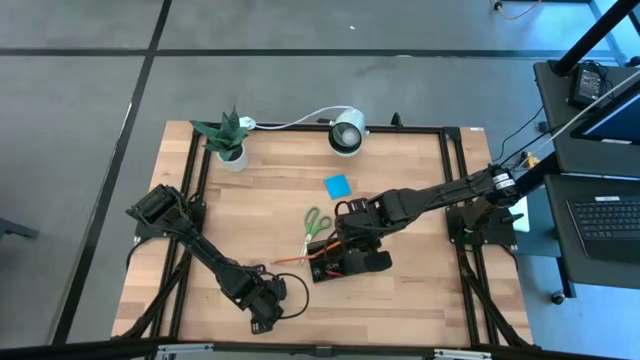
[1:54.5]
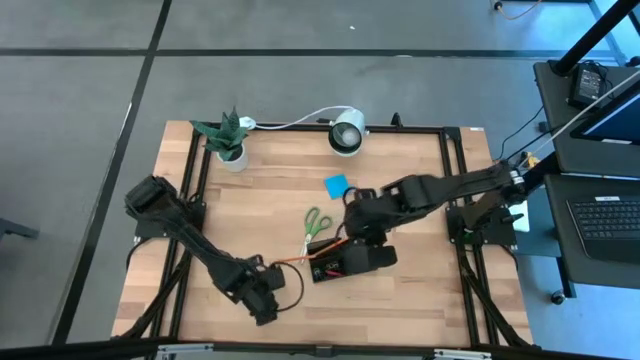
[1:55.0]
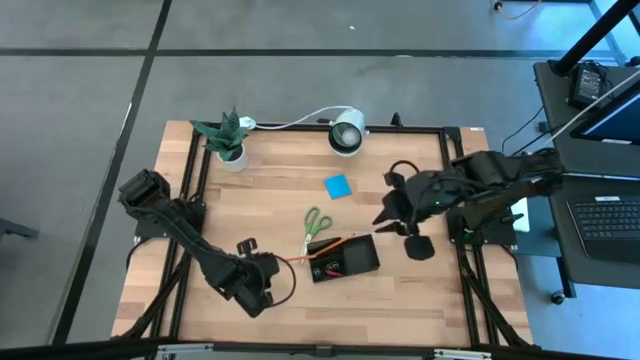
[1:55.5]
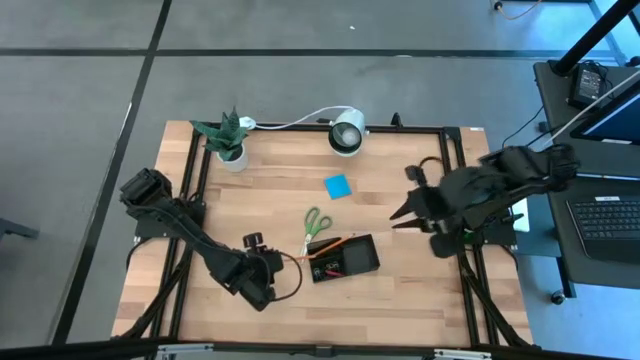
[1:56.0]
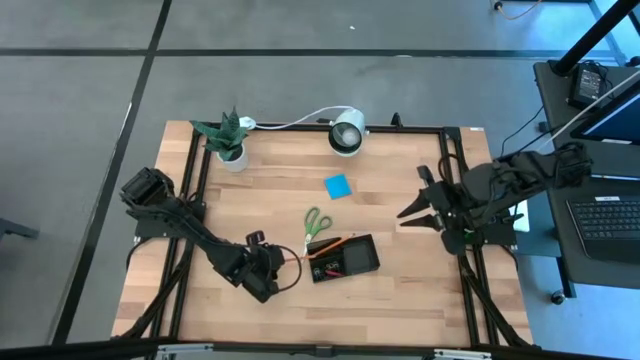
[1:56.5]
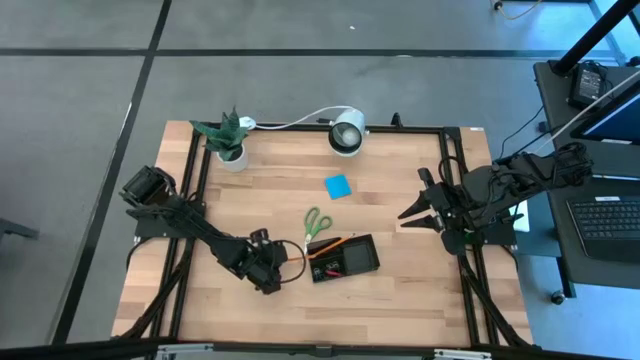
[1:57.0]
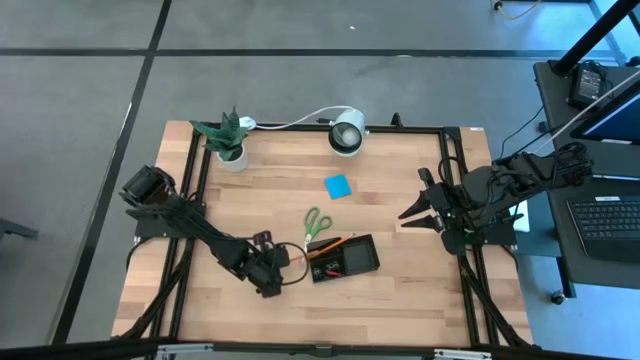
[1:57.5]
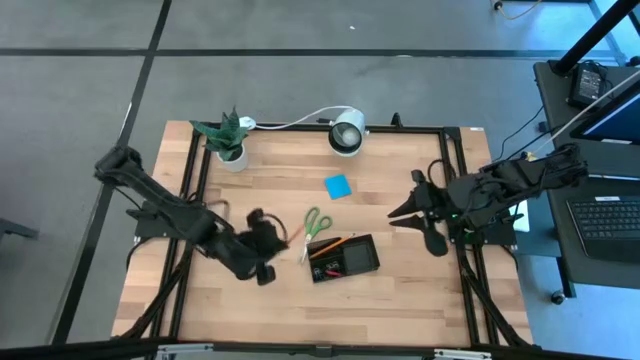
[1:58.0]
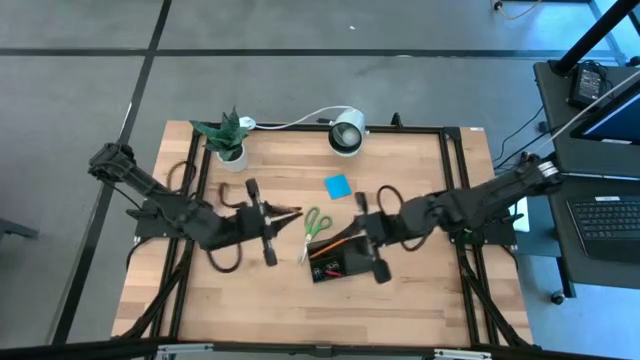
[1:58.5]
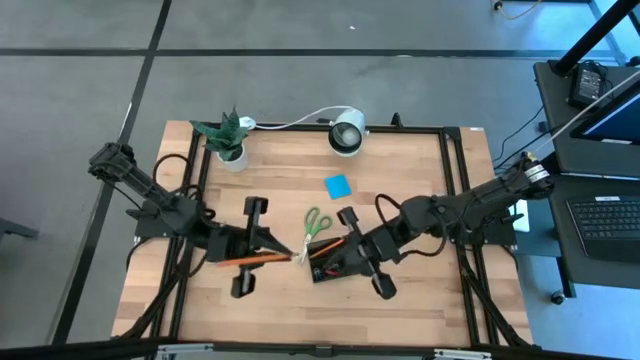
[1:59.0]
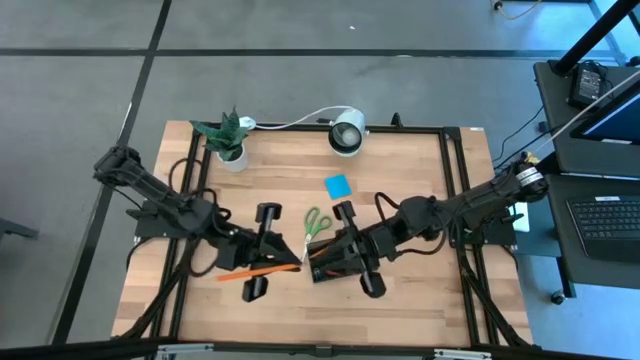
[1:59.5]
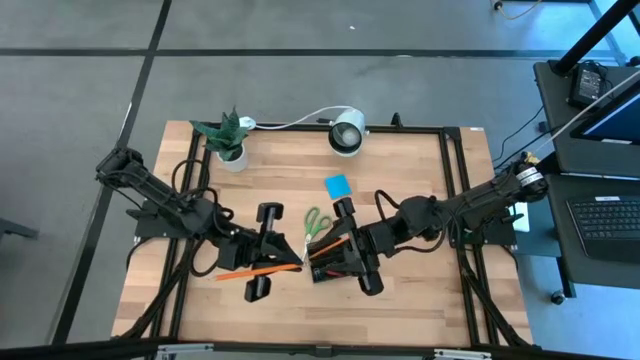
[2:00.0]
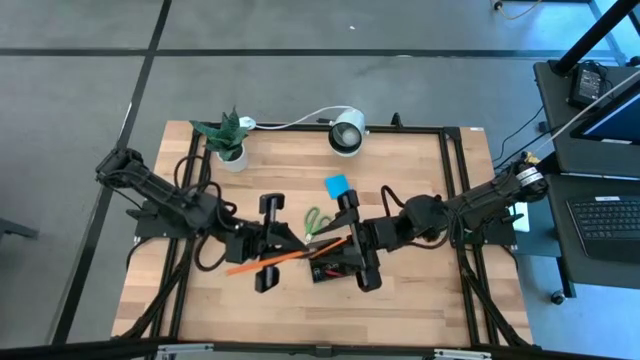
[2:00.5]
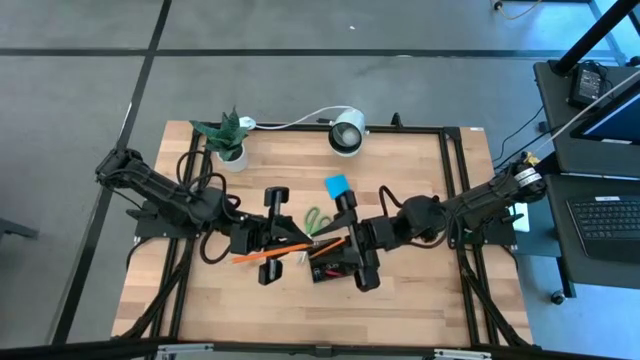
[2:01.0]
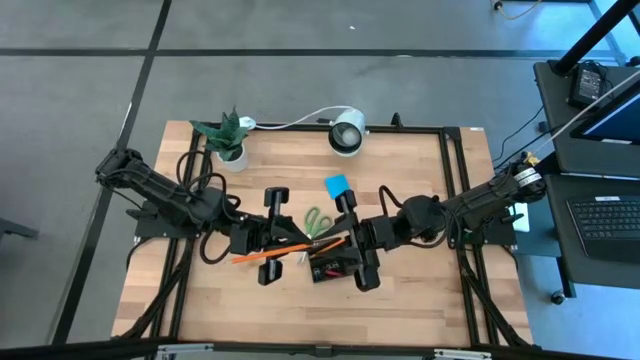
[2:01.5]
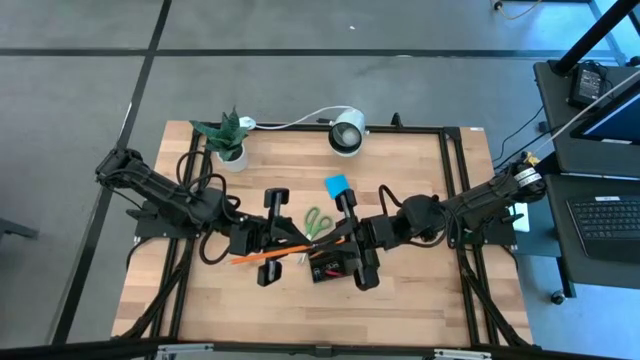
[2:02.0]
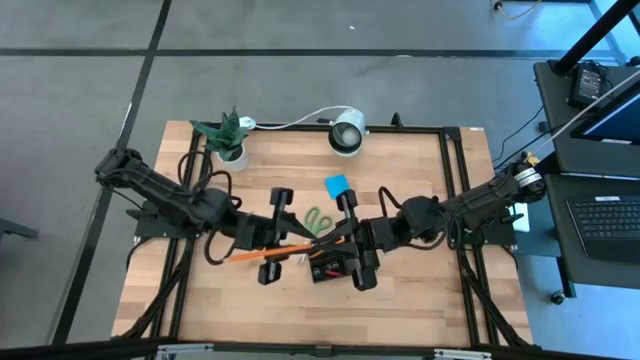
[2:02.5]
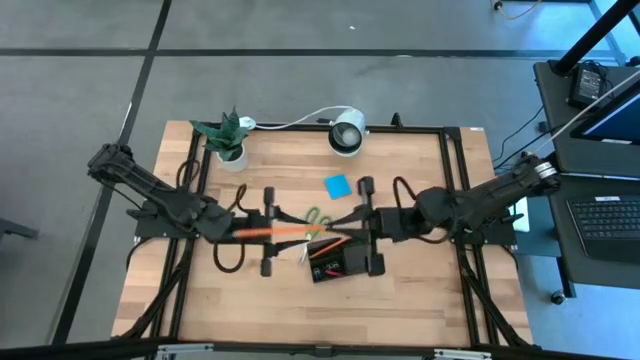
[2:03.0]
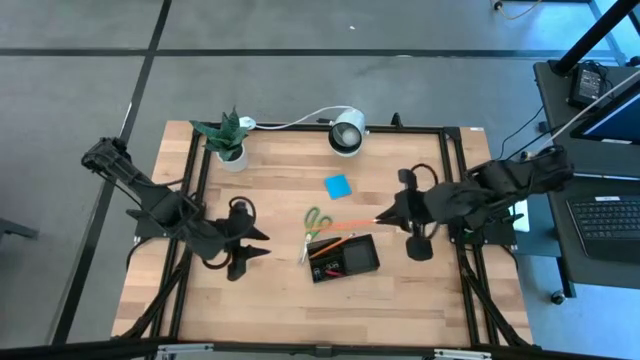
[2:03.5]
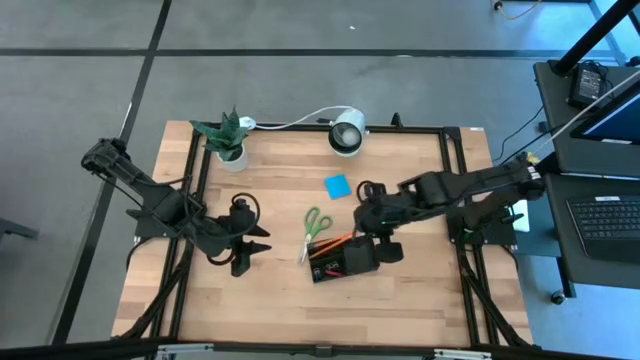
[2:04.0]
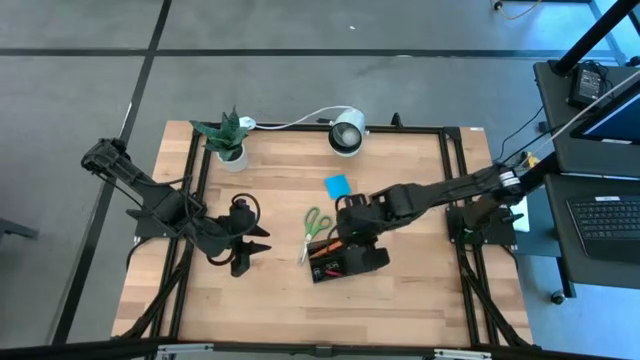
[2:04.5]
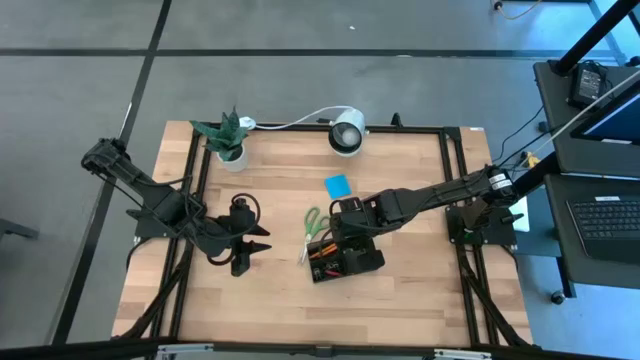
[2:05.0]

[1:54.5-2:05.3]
Task: Pick and place office supplies into organizer
Put the pencil into the desk organizer

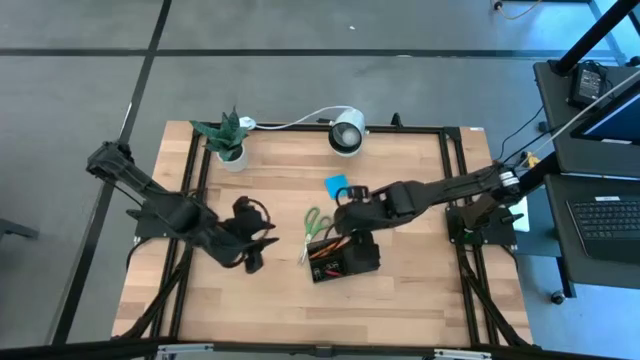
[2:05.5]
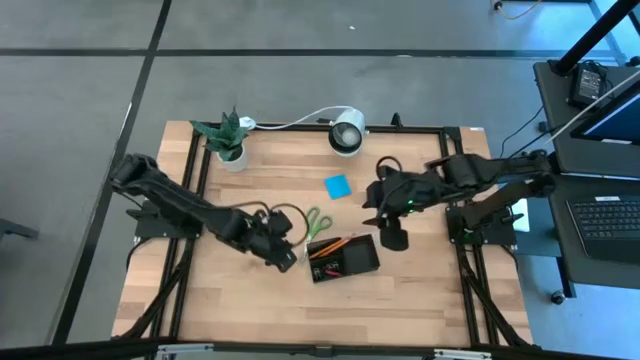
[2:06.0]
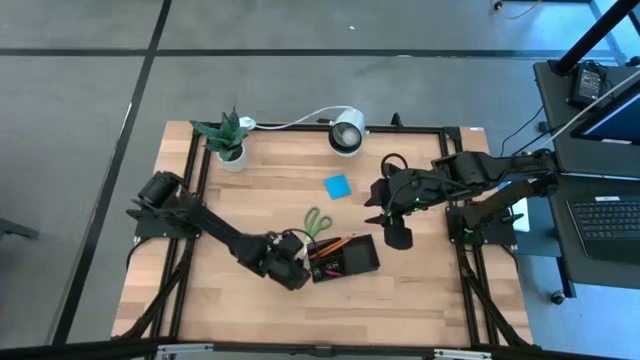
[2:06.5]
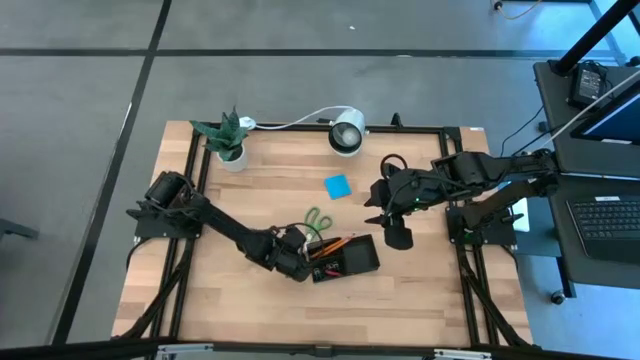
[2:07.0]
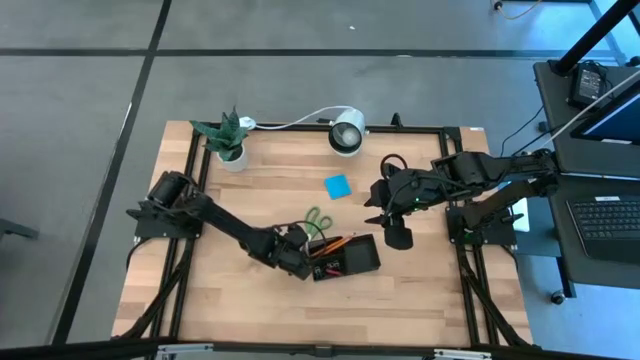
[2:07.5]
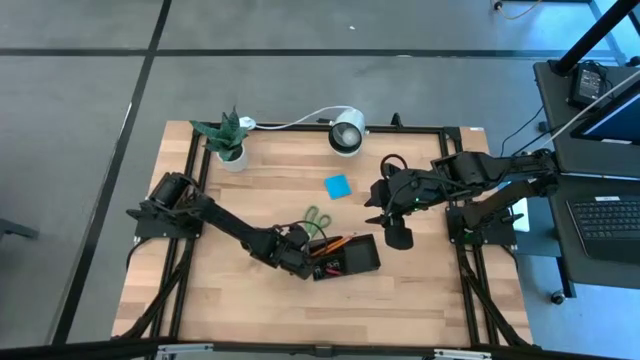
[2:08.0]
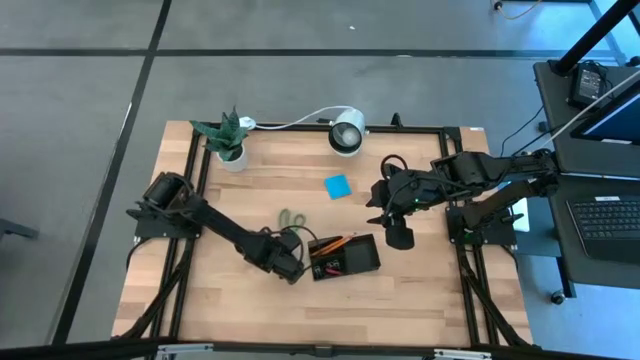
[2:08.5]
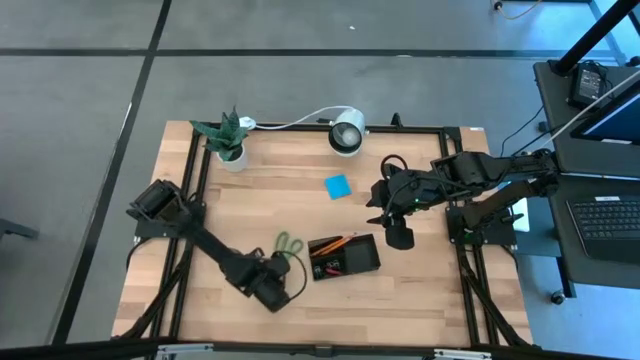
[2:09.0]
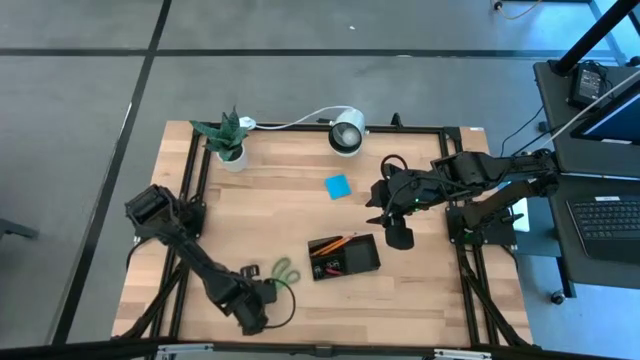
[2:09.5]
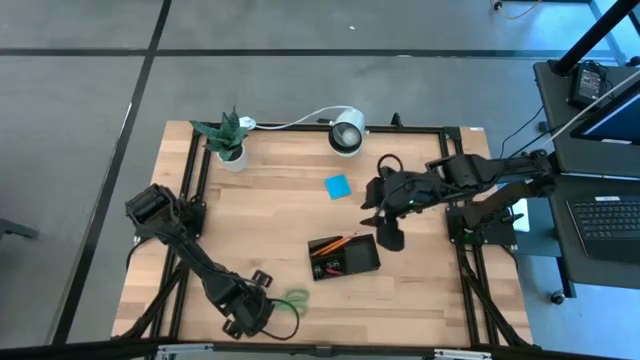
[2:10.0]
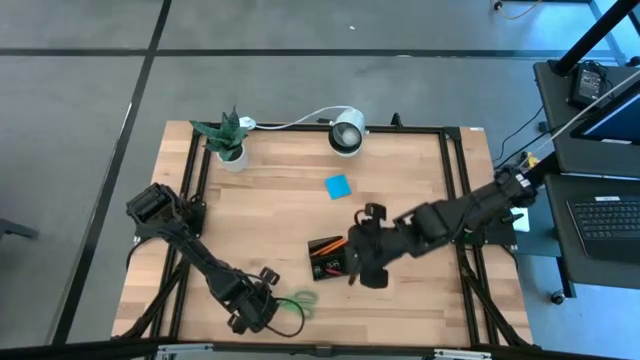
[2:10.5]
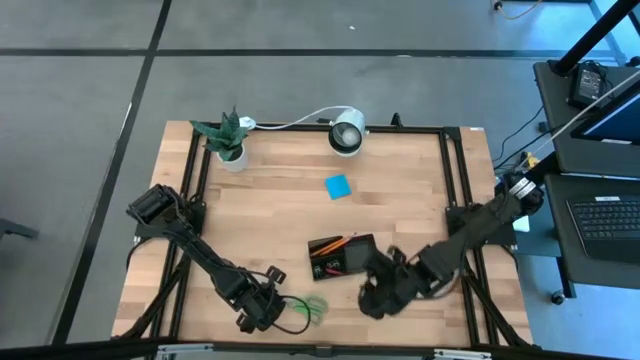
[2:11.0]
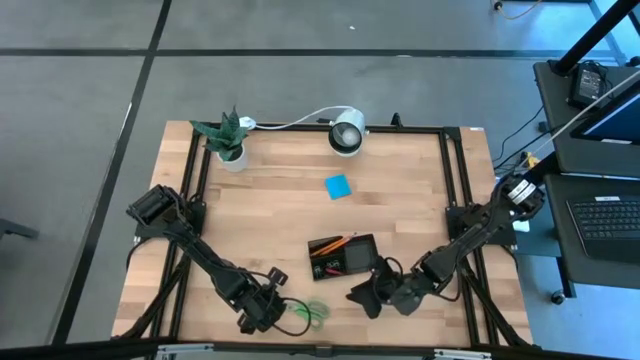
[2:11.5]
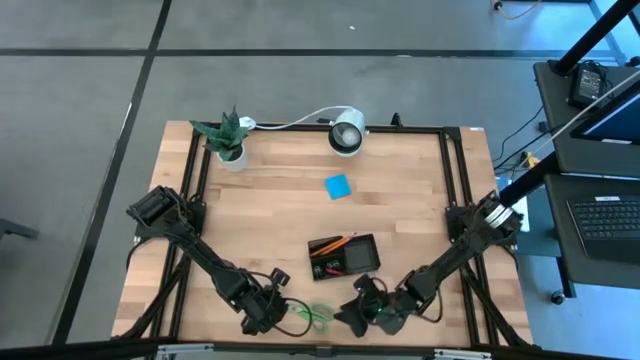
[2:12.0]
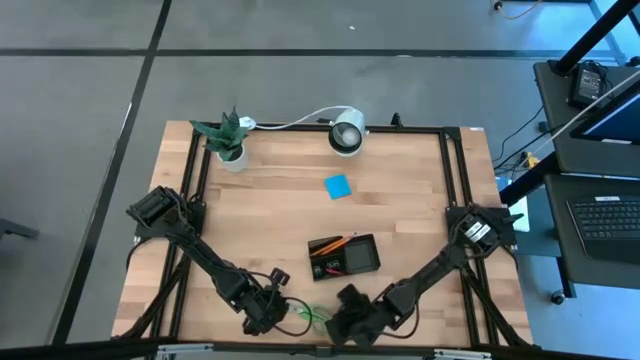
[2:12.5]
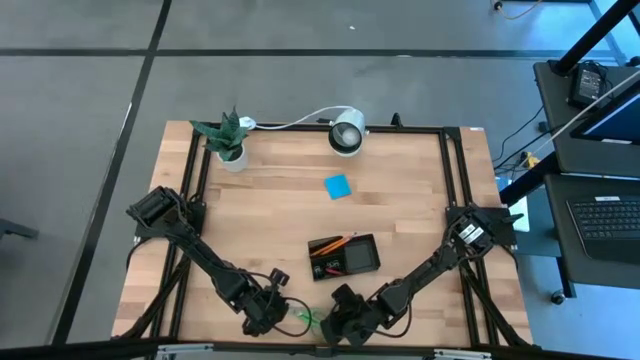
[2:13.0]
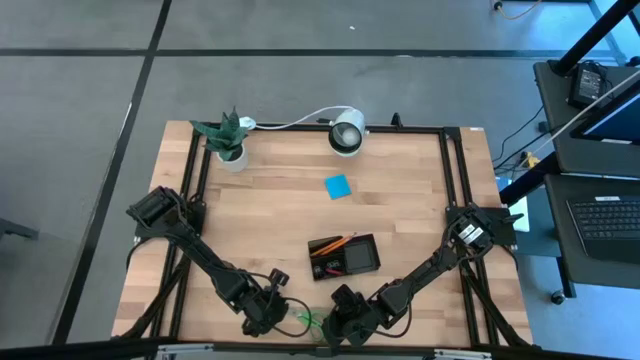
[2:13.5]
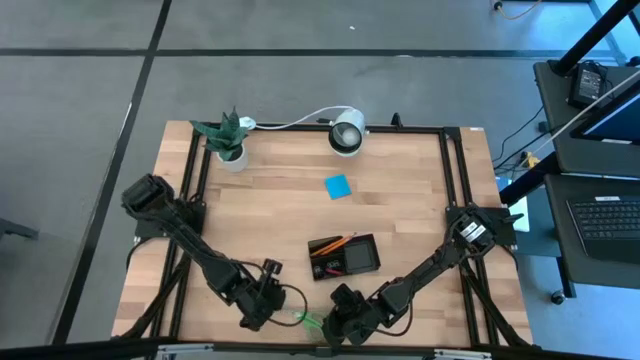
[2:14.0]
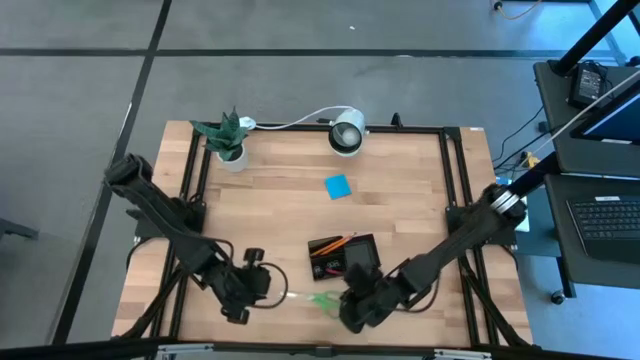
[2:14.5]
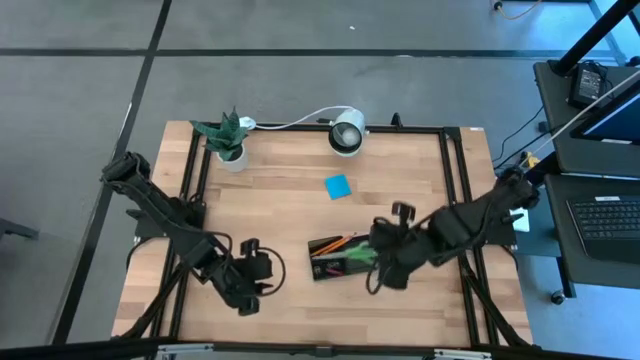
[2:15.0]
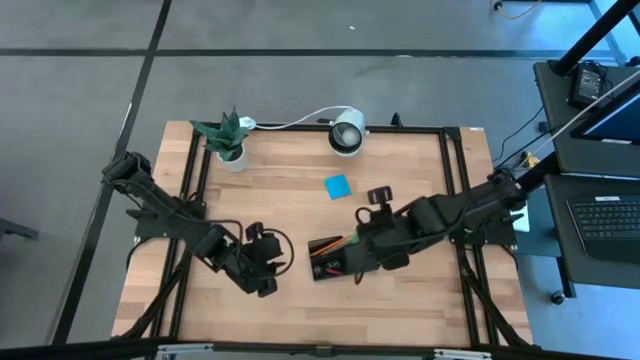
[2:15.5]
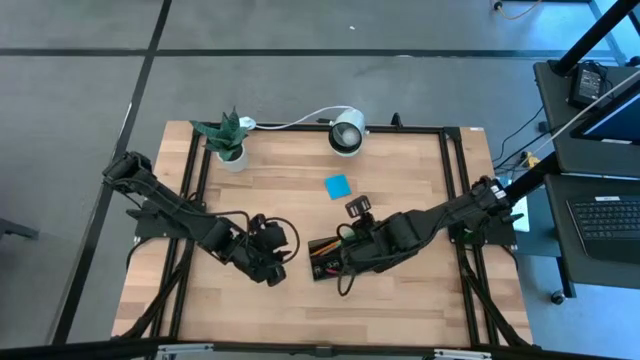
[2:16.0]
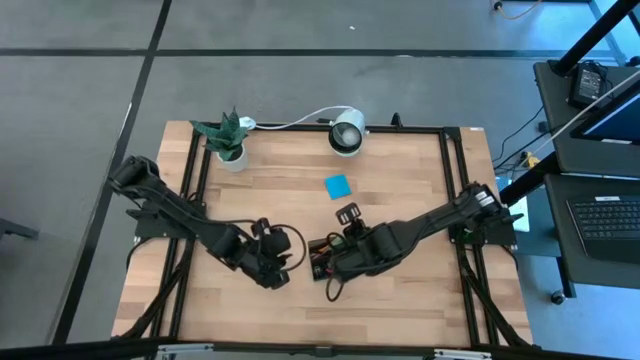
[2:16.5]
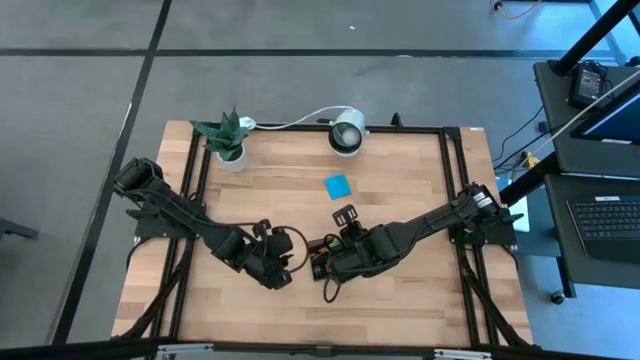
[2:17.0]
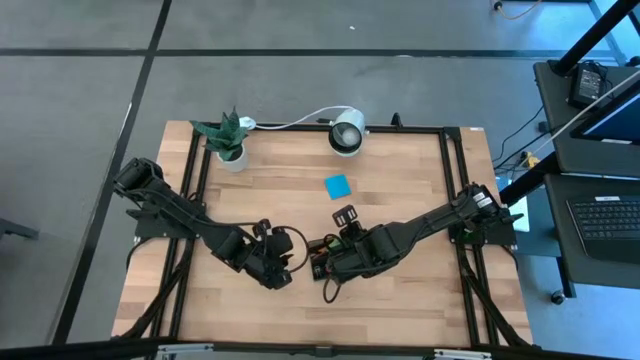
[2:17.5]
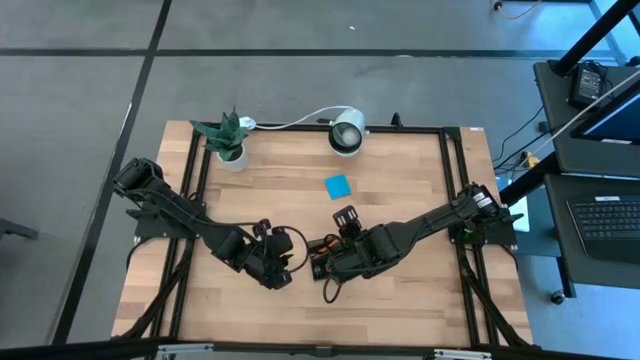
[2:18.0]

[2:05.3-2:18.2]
Put the scissors into the desk organizer
